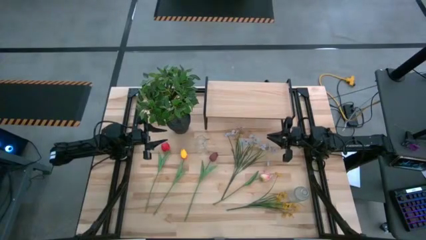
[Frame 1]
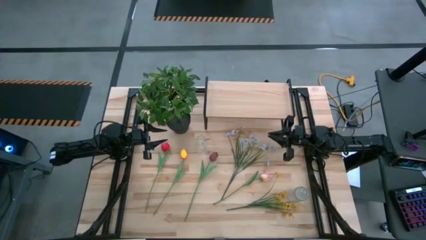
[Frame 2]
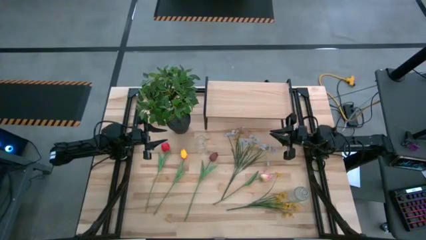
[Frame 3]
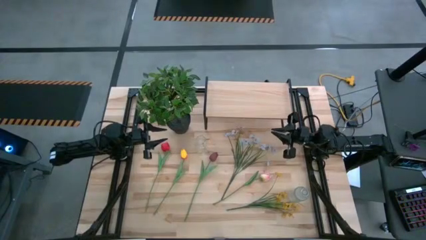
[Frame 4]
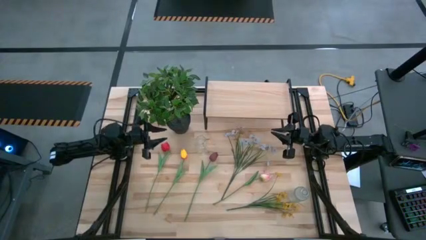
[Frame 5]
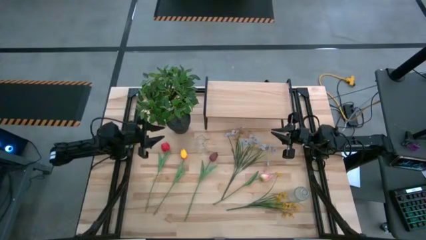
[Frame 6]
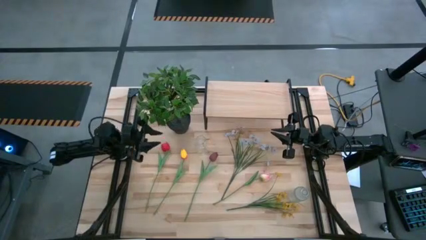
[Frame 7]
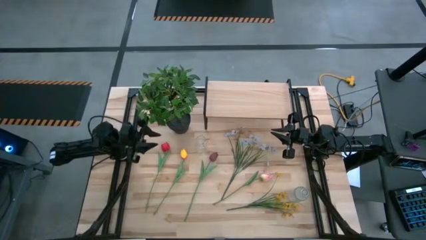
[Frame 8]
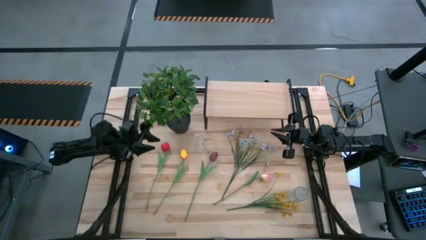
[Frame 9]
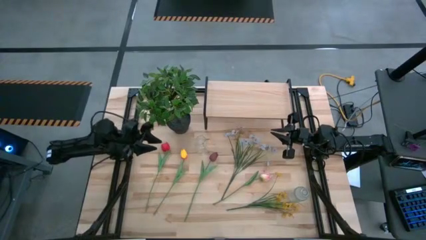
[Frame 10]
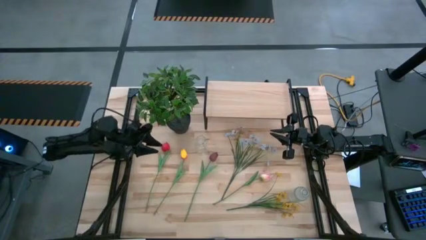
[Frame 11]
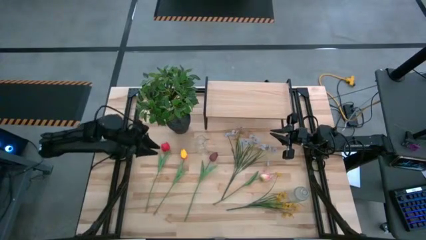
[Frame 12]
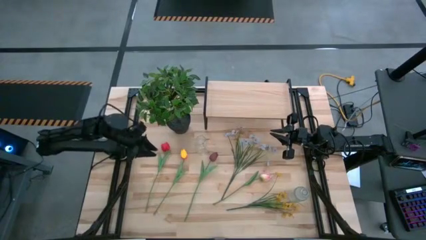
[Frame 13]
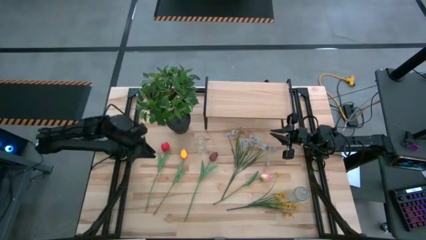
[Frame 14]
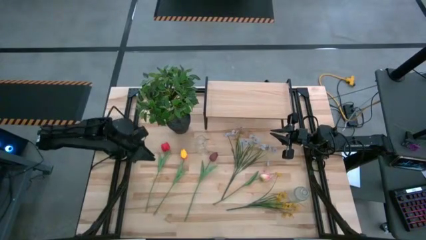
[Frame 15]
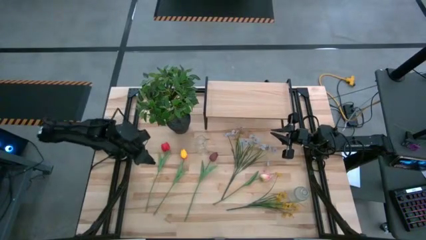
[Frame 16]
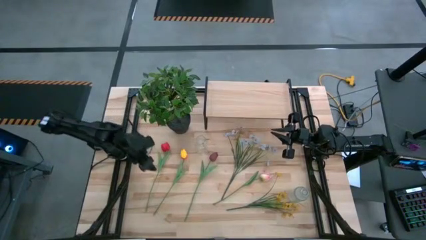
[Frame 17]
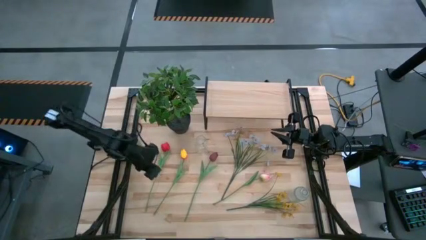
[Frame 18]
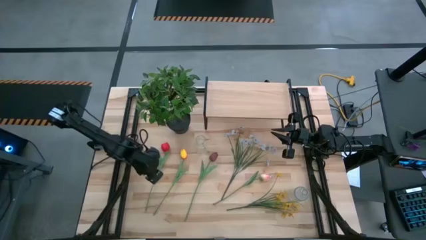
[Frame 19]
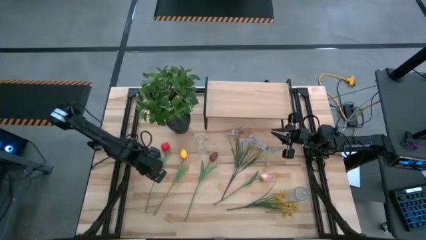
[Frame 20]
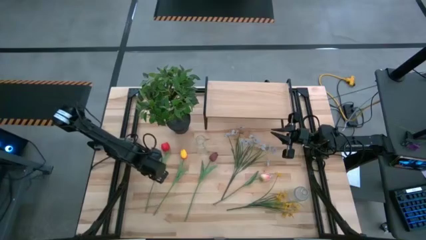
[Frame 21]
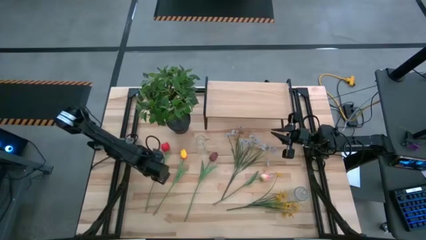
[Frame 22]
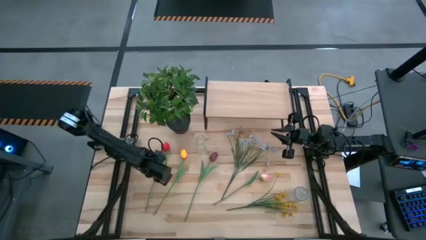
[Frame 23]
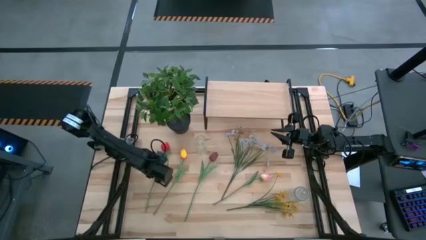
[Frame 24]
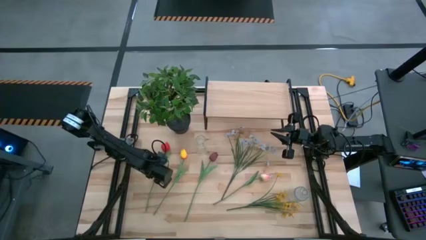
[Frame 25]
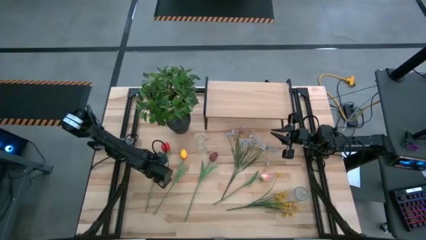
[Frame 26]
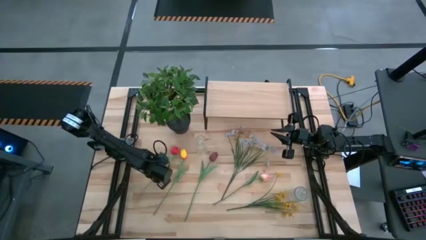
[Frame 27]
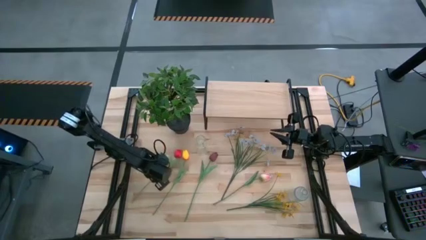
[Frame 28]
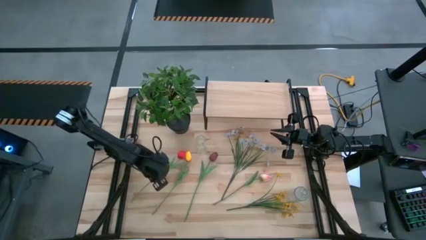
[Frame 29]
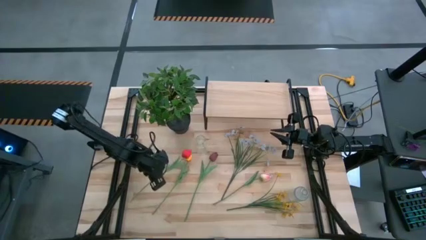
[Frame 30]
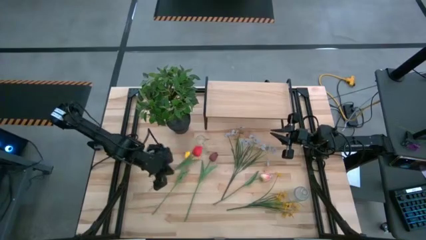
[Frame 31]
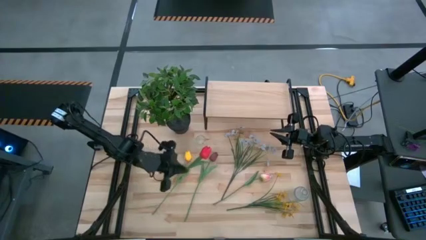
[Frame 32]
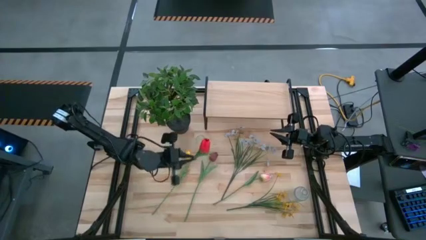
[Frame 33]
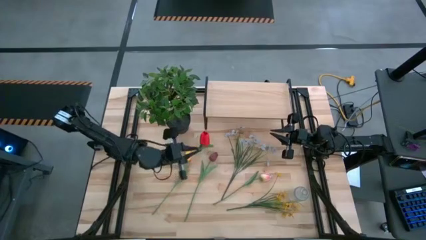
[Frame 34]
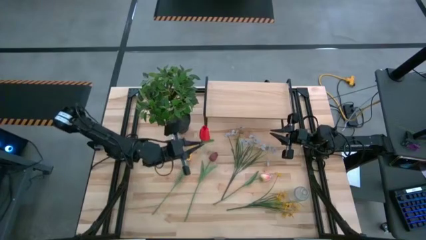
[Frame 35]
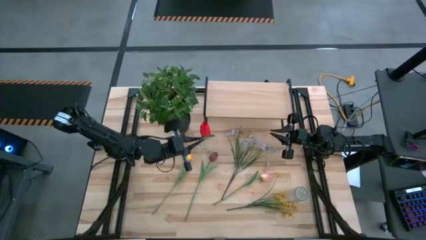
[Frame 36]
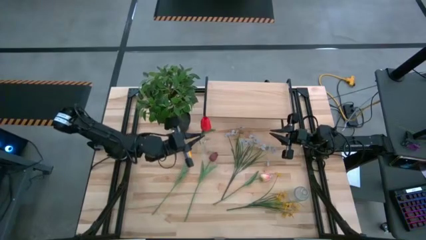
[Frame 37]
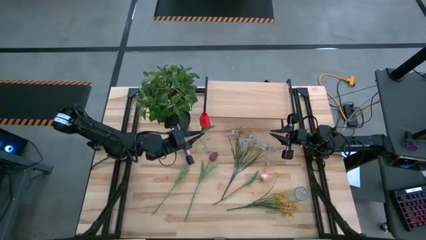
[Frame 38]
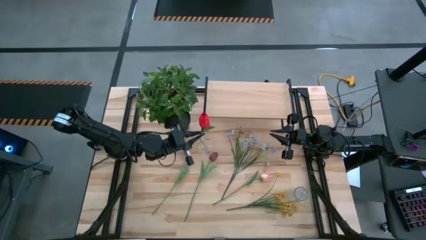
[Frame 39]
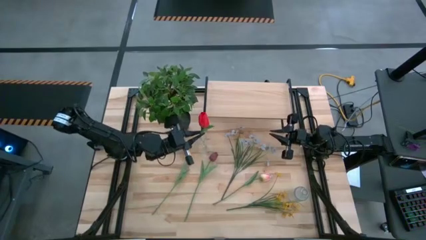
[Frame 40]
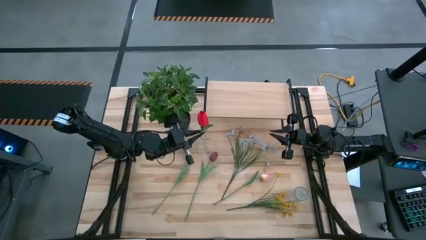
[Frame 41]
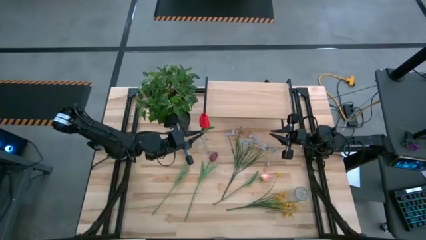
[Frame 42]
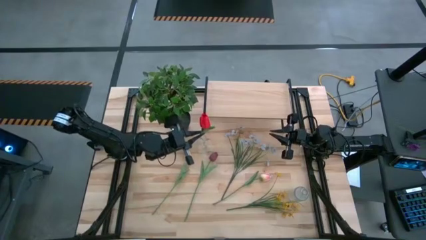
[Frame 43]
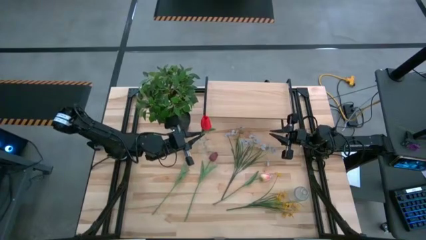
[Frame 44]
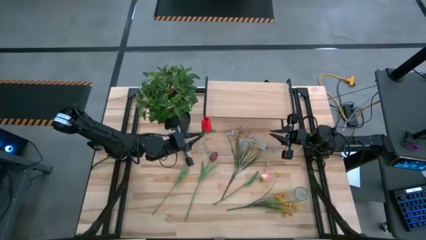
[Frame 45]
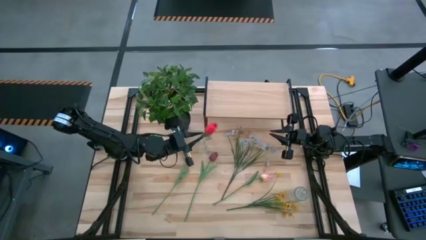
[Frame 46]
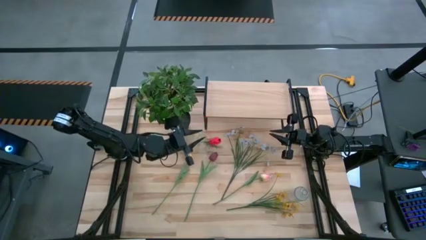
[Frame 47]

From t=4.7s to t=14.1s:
Task: Pick and place flowers into a vace then onto a shelf
Put the red flower into the top transparent vase

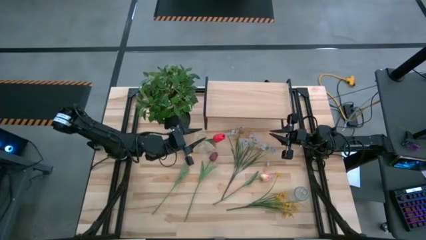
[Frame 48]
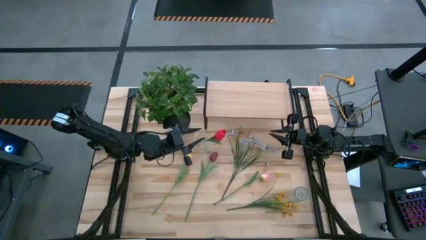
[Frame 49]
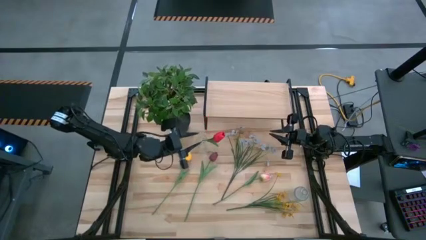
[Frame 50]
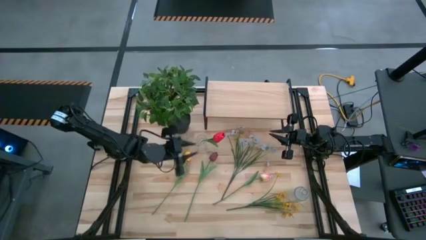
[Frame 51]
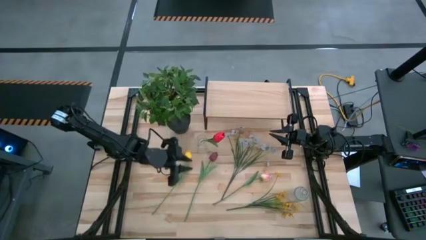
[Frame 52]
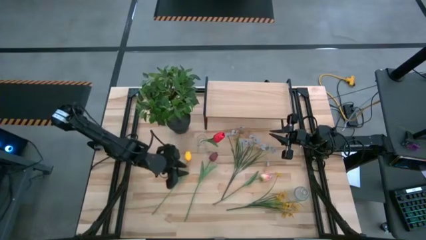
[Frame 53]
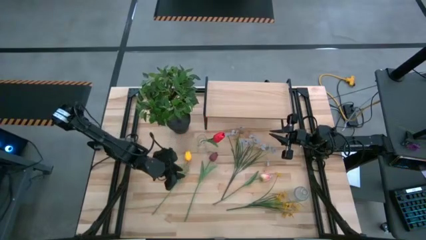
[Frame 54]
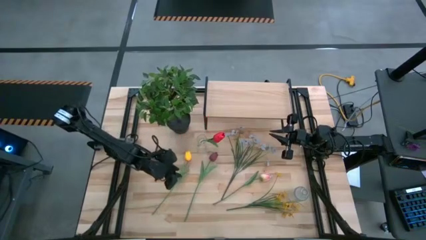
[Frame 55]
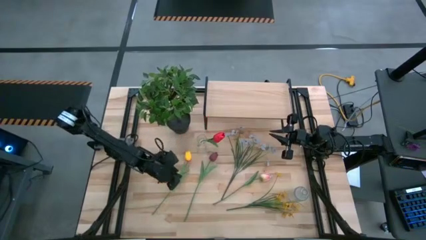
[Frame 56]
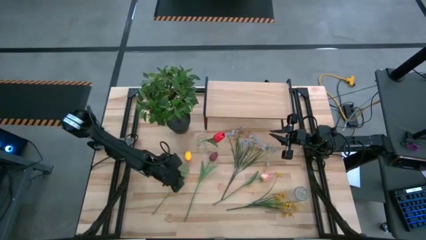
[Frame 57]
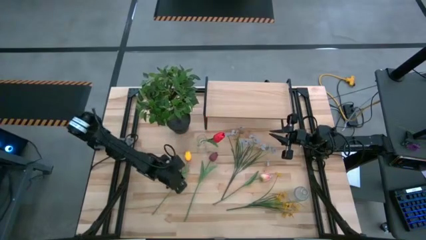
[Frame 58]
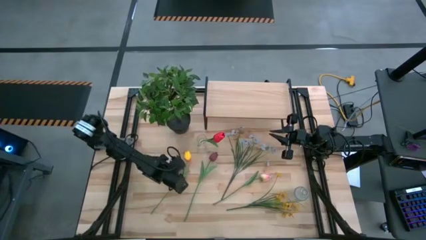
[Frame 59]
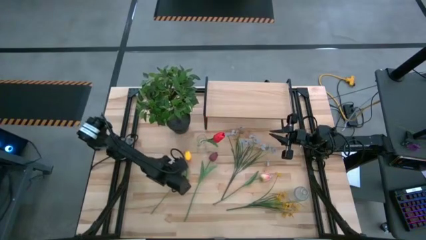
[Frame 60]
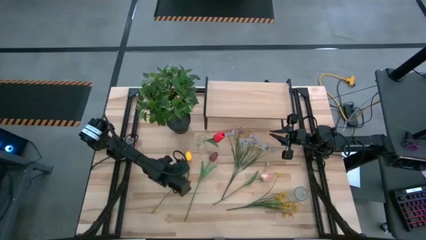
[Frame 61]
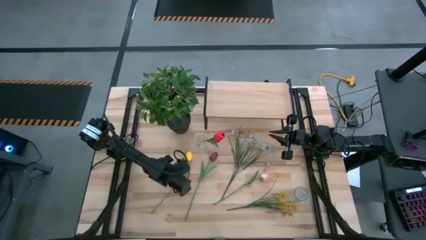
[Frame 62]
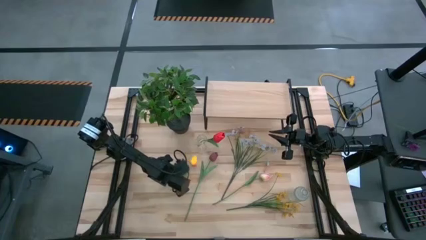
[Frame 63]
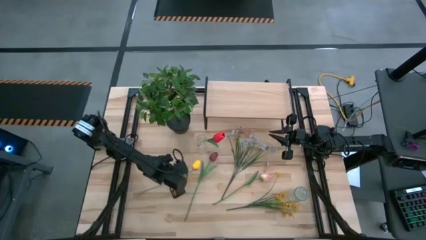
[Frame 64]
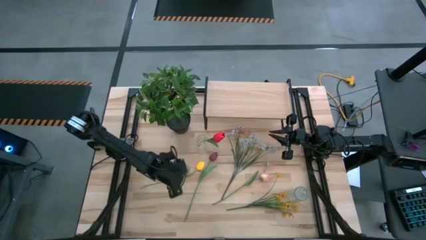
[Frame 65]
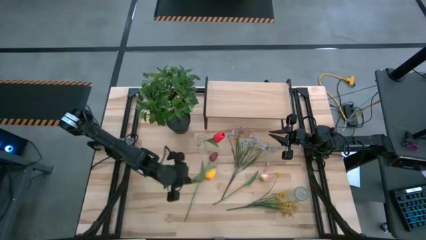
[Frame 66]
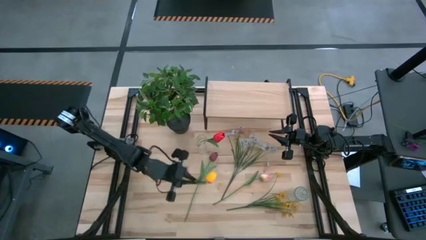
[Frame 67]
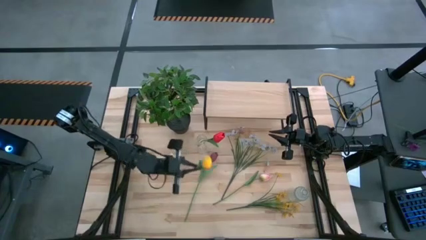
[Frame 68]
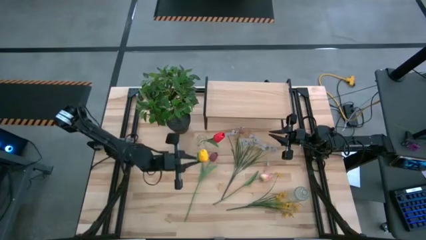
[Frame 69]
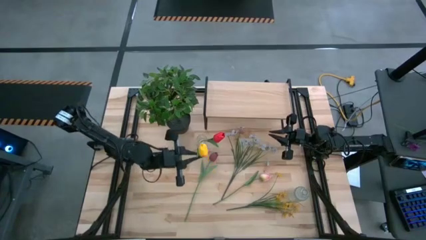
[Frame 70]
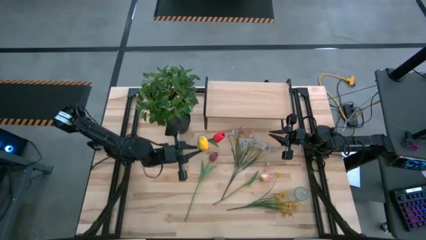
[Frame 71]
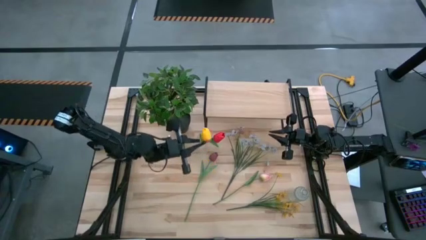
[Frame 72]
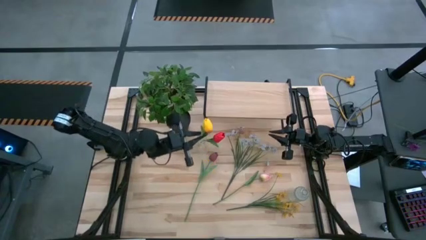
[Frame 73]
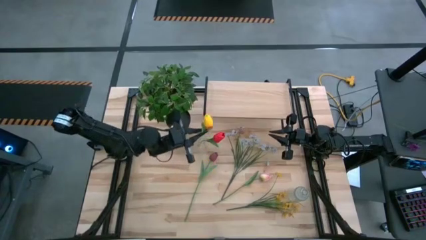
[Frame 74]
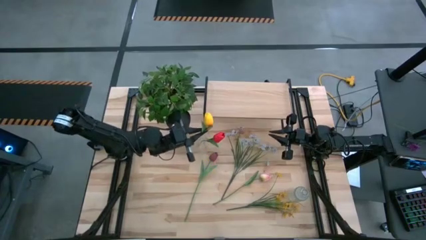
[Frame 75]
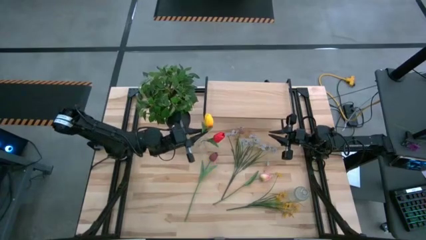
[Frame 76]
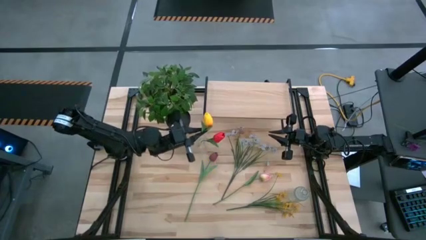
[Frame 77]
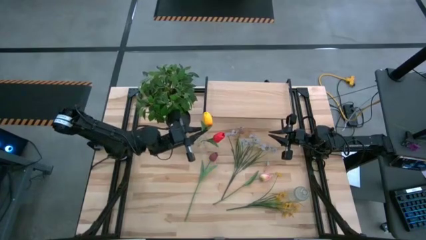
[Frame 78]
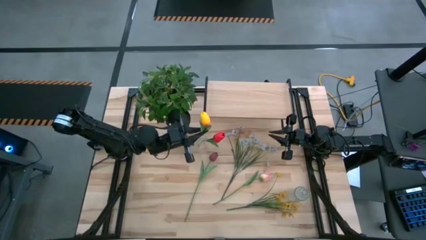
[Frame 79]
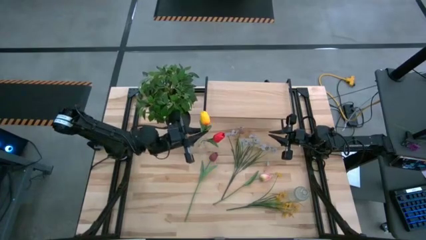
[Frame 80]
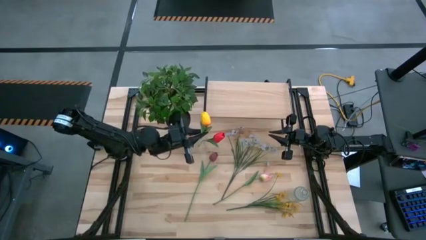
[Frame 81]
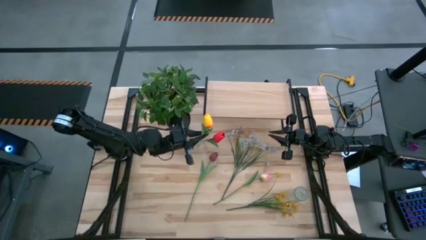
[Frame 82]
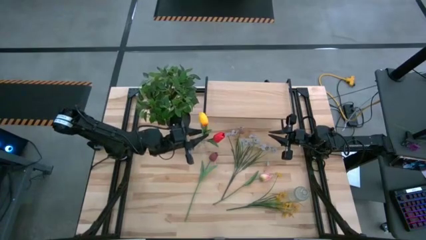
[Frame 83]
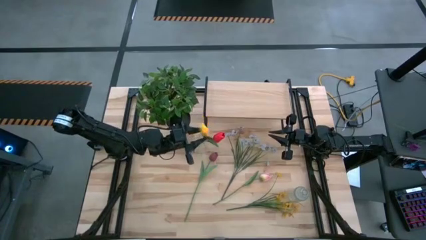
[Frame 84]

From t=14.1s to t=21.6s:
Put the yellow flower into the top transparent vase
